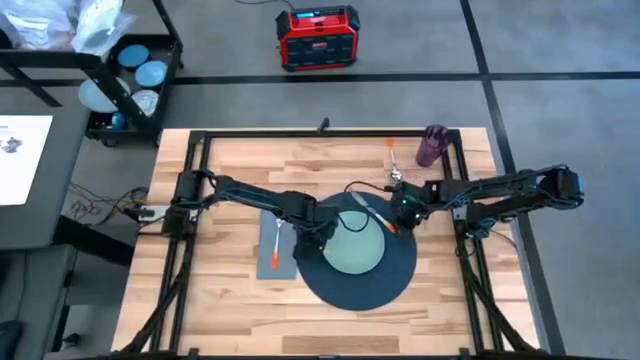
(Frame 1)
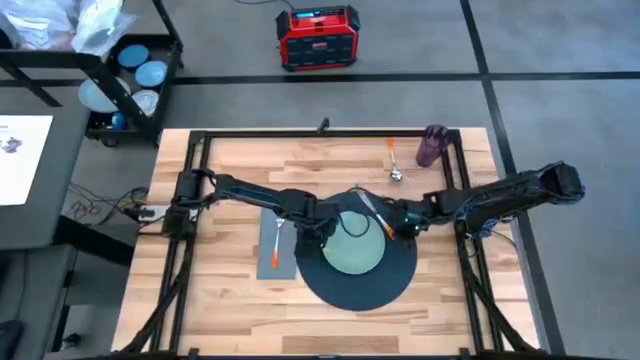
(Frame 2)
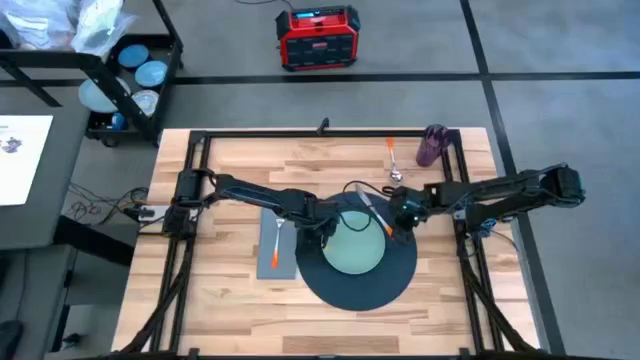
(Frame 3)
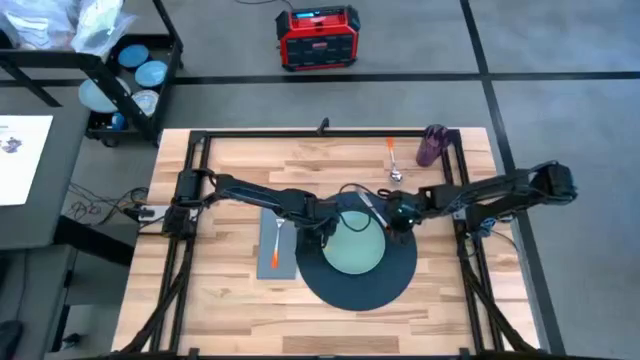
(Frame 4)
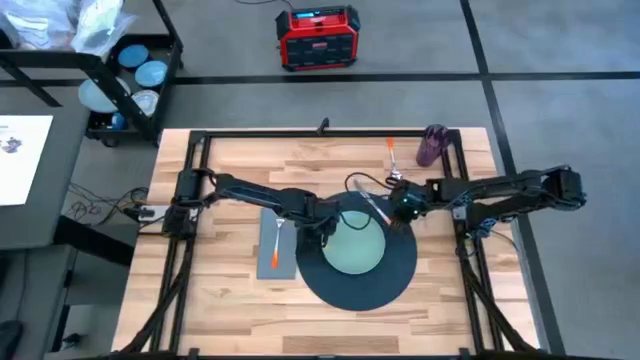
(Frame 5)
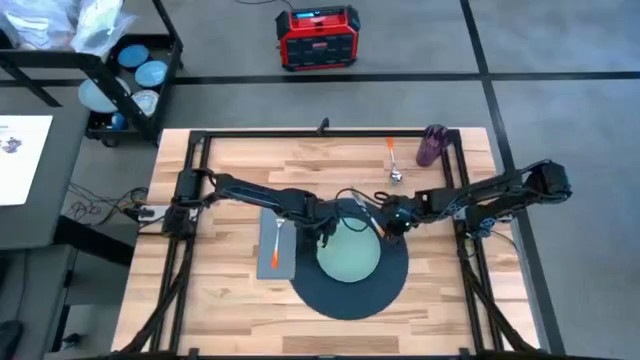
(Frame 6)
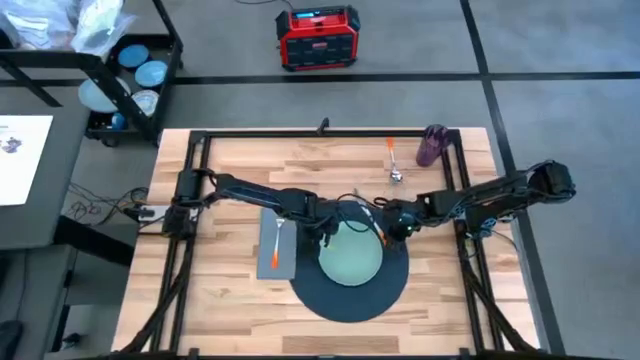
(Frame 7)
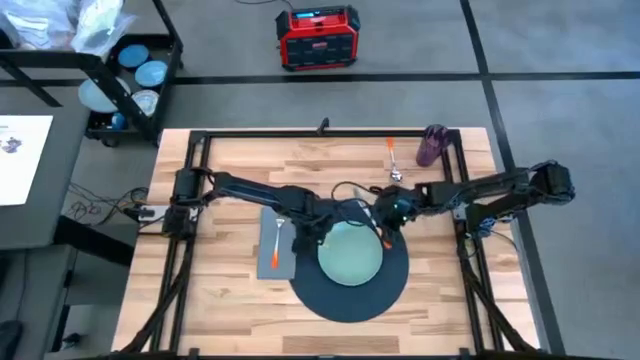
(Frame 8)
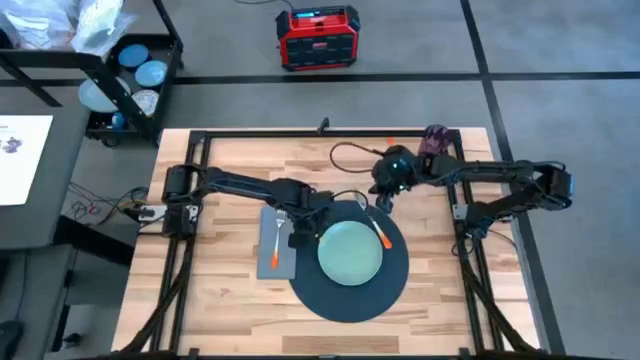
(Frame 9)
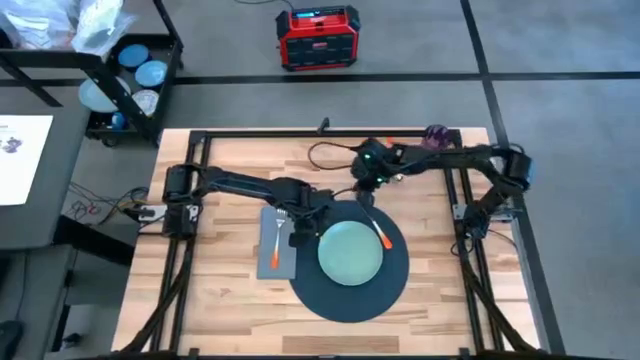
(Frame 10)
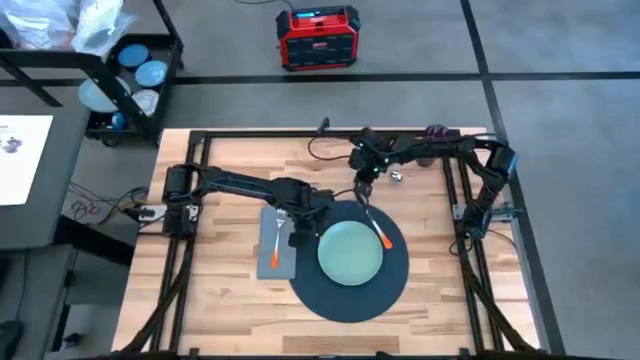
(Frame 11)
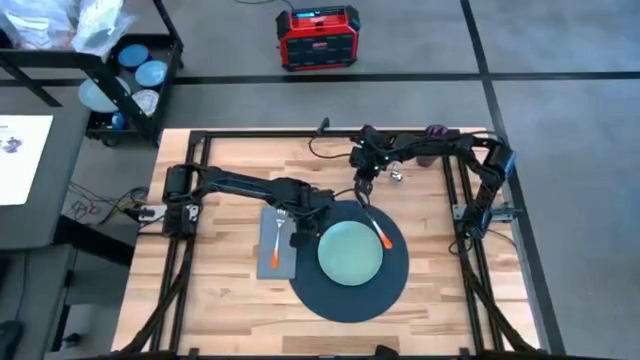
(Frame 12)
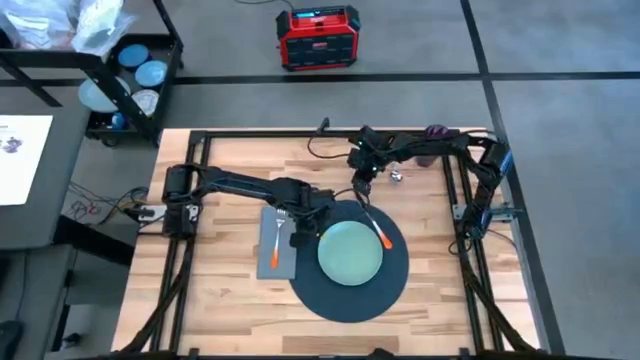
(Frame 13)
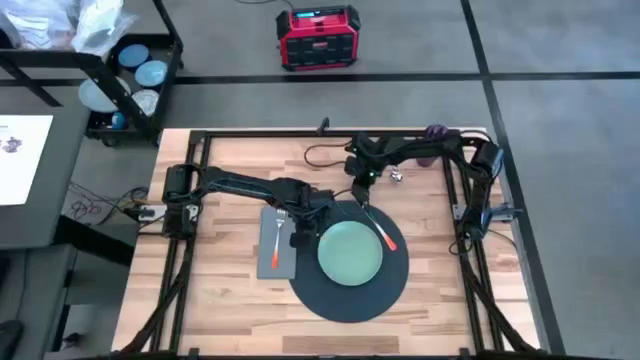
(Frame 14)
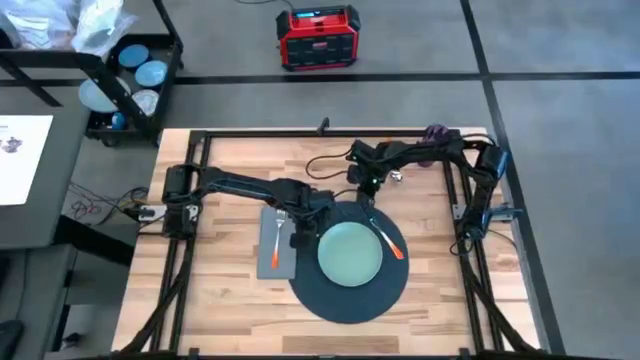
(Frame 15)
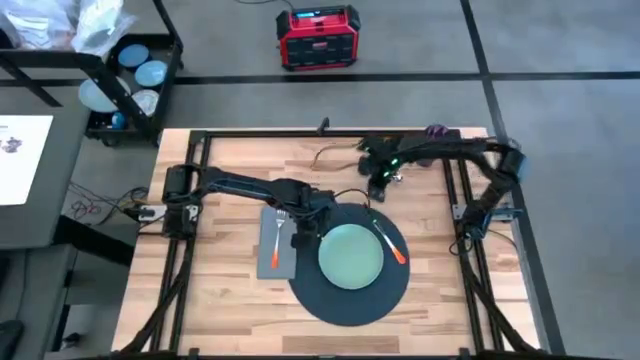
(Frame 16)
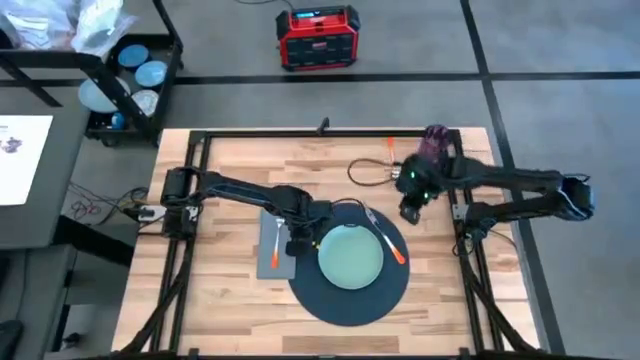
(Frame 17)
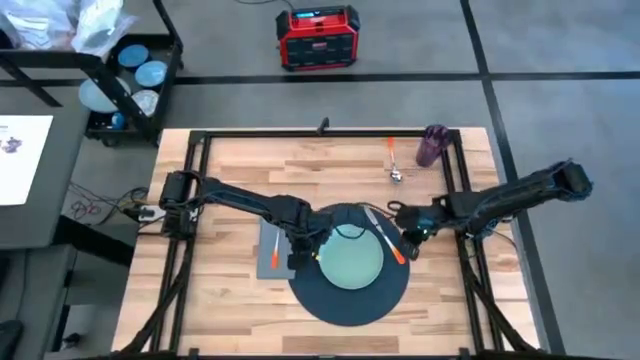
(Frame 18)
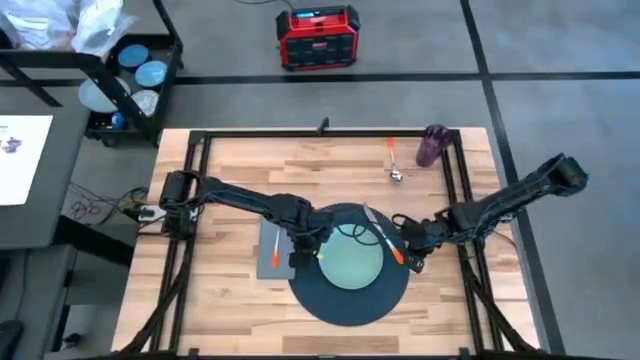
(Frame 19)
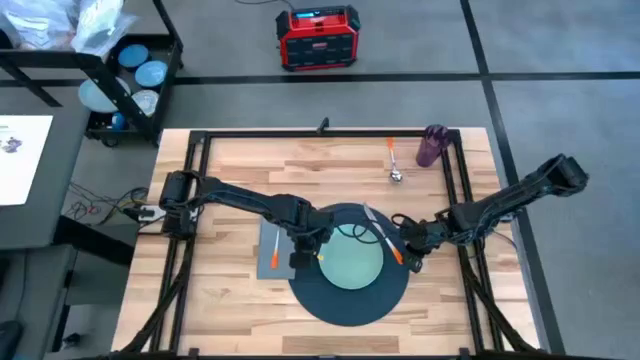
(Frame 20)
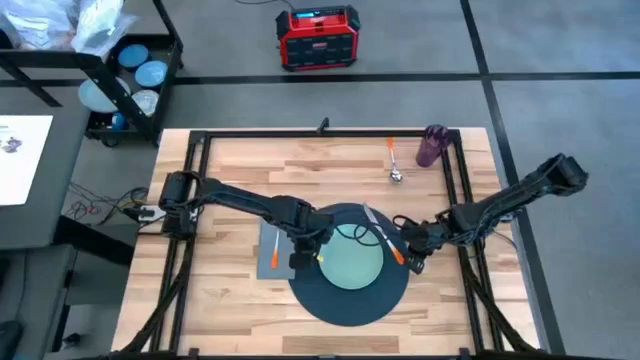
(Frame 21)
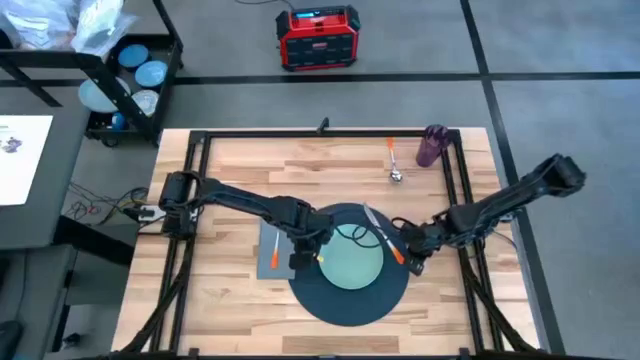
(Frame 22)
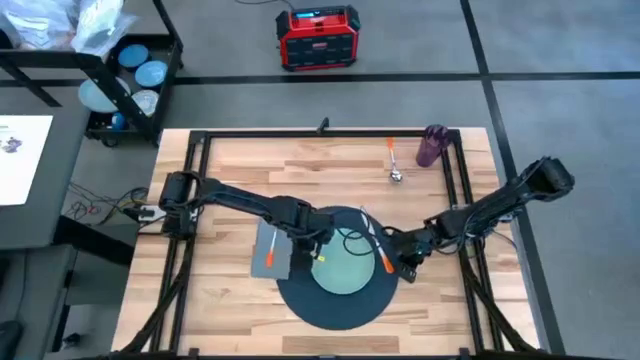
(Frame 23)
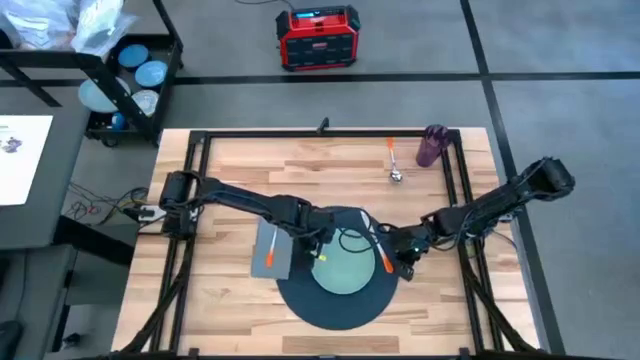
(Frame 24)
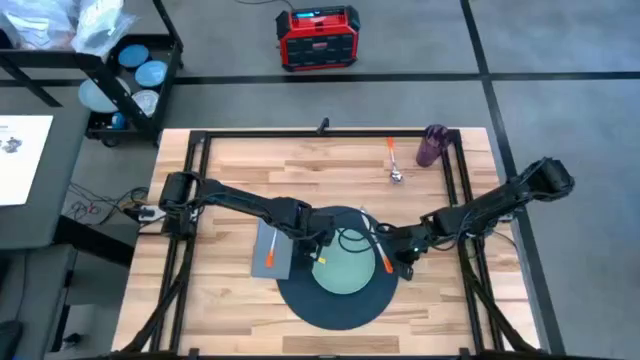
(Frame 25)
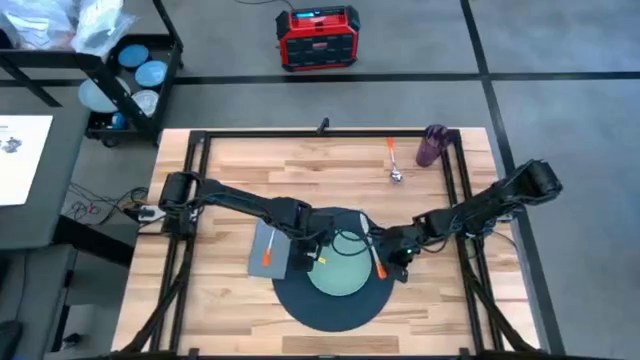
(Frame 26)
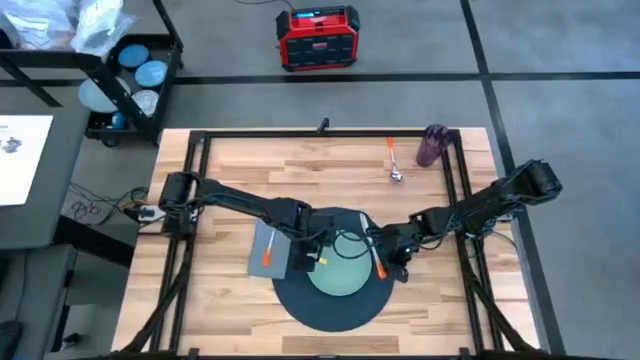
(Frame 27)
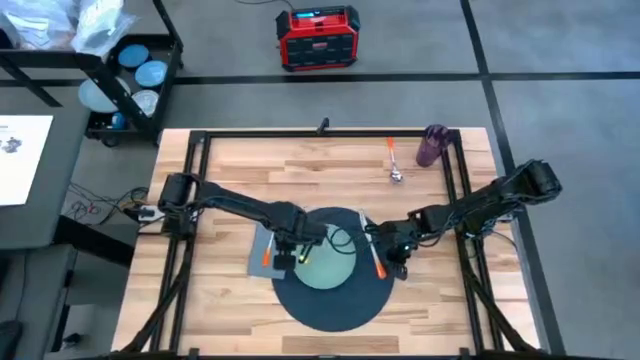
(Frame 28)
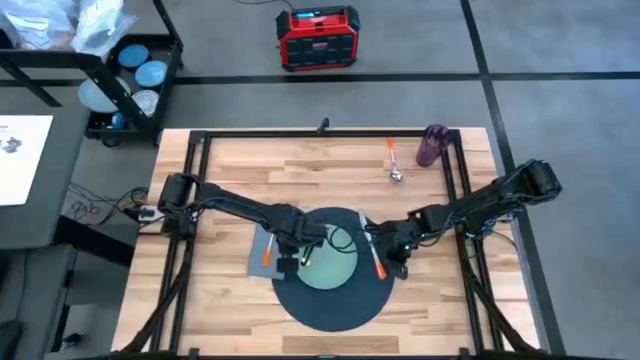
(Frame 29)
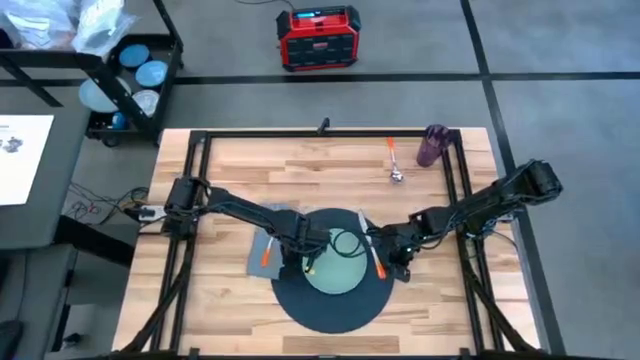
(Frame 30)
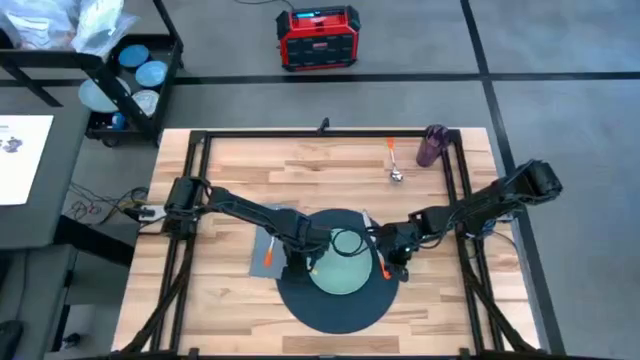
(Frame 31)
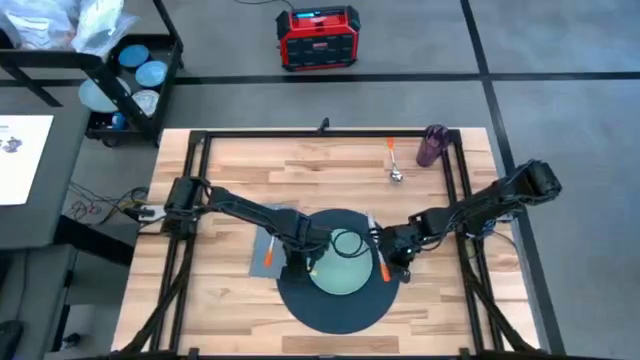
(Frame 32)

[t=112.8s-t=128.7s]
Task: Set table place
Put the orange knife on the blue placemat

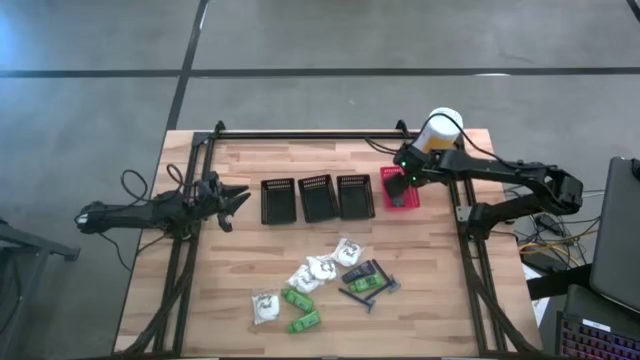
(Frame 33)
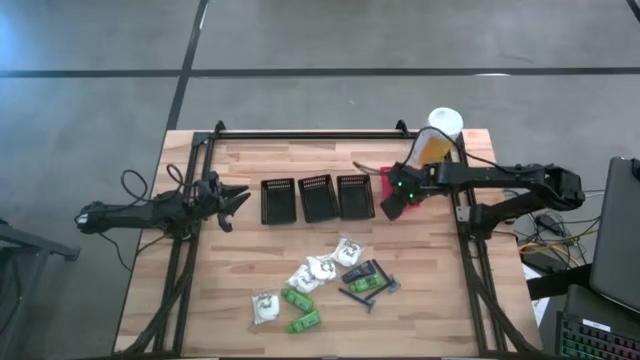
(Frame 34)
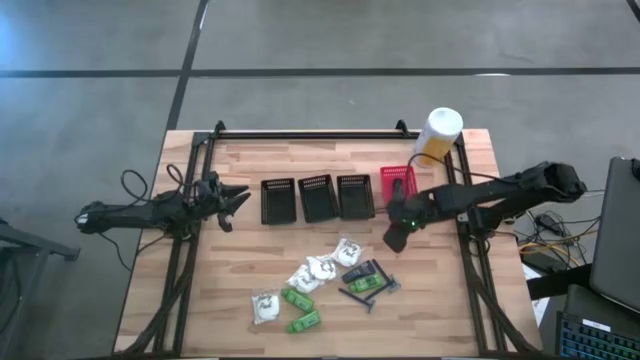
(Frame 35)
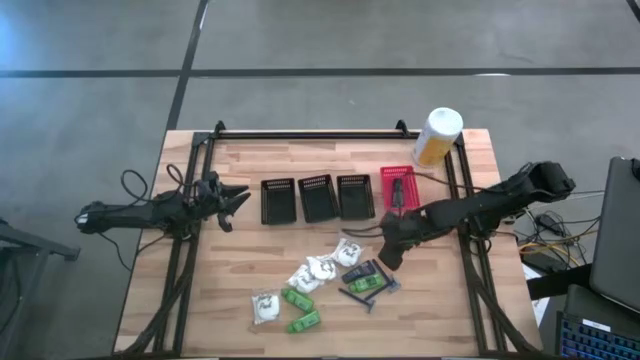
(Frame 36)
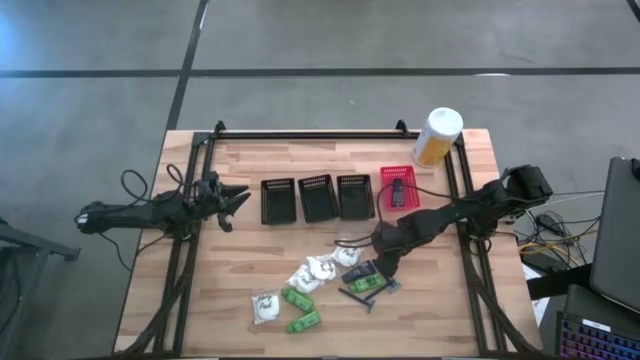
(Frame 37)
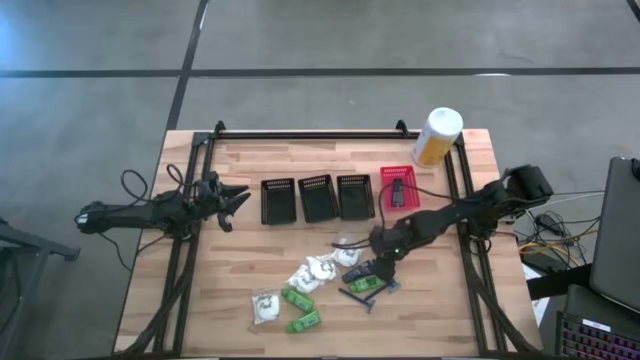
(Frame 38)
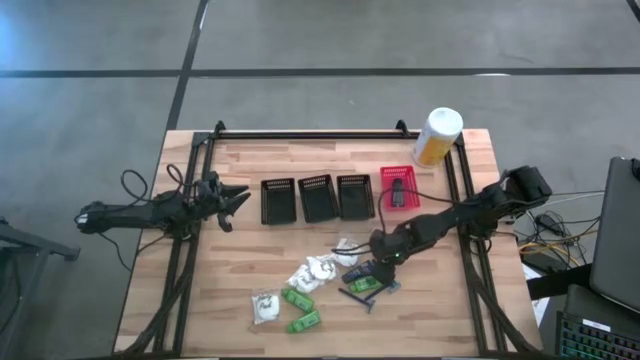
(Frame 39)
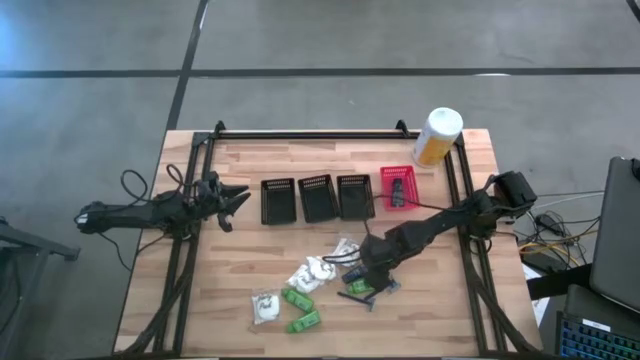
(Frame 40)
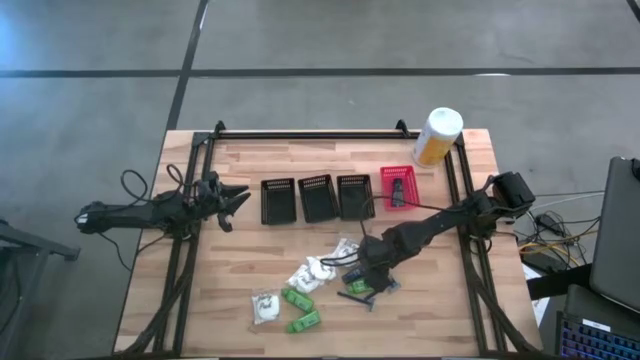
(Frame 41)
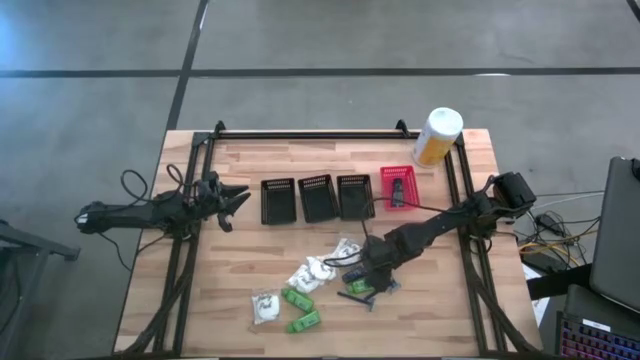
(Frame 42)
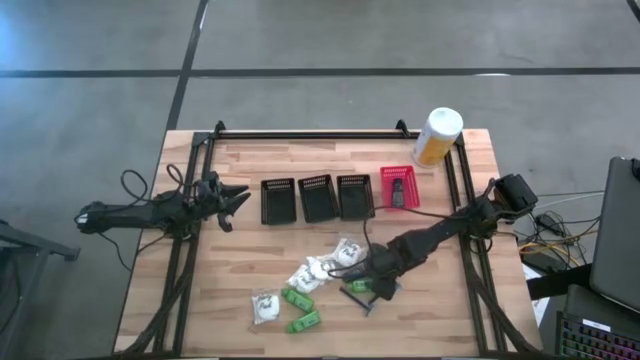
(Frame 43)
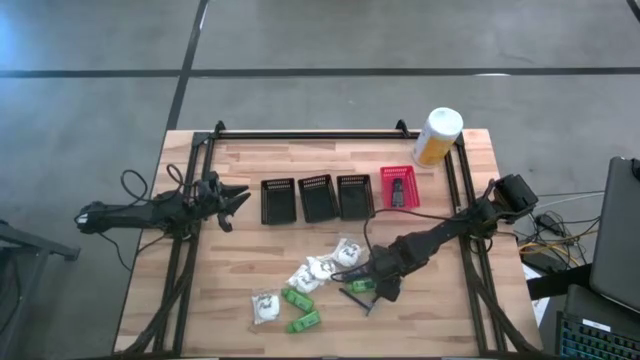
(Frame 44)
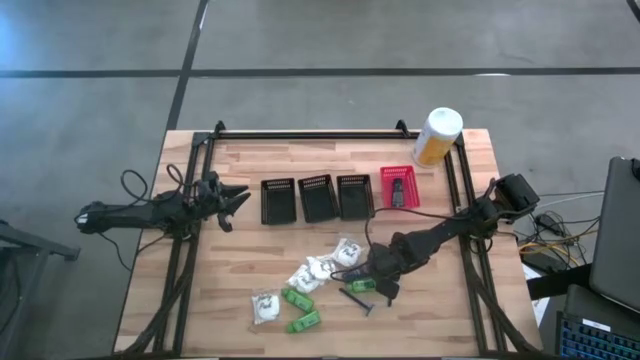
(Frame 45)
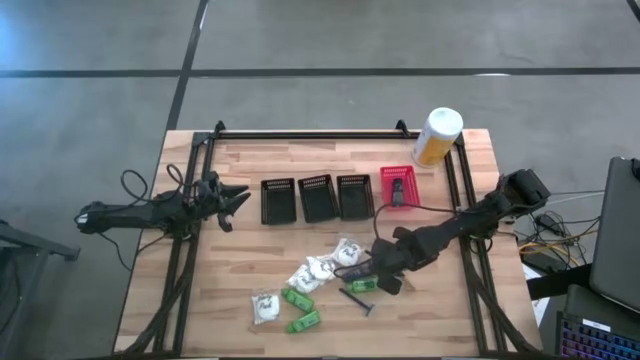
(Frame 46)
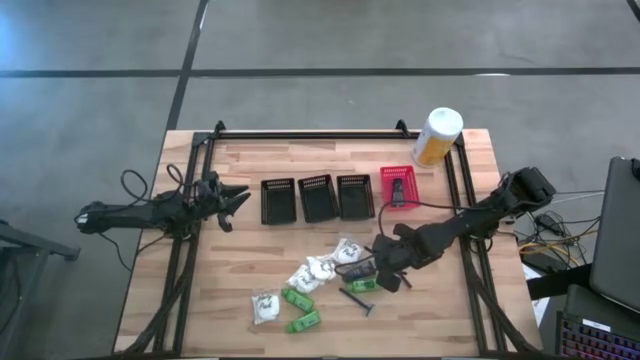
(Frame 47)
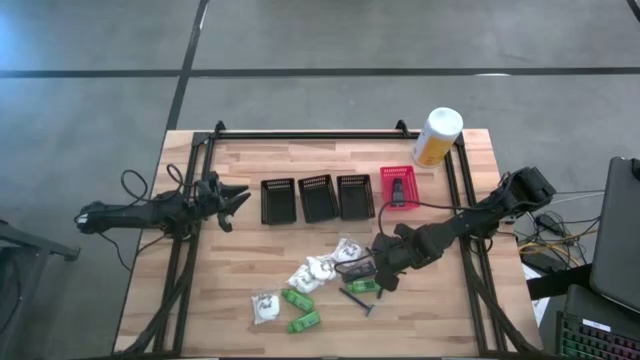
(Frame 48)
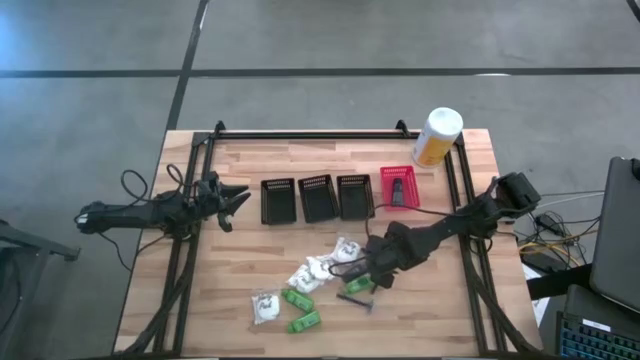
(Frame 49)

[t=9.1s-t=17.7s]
Task: Pick & Place Travel size toiletries
Put the top right blue razor into the middle black bin
